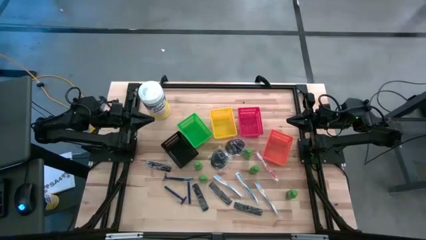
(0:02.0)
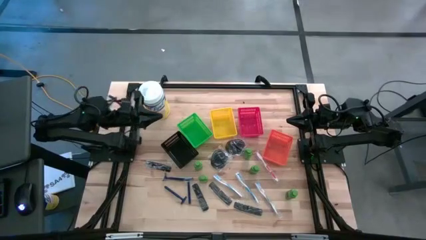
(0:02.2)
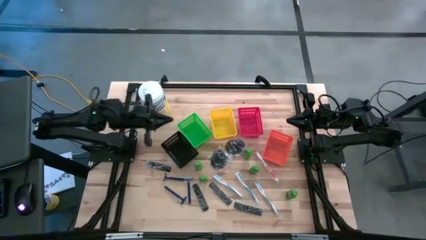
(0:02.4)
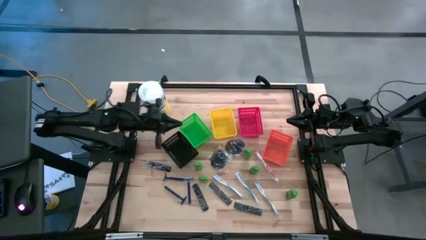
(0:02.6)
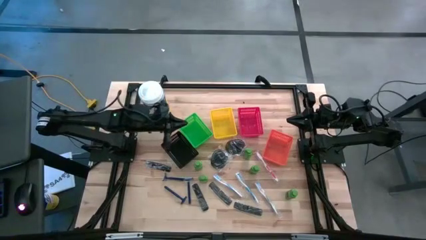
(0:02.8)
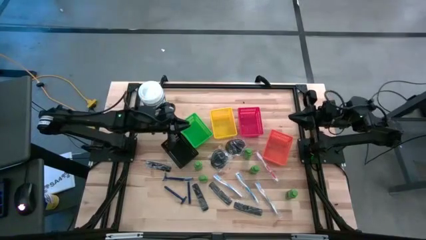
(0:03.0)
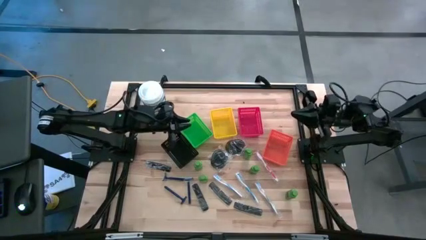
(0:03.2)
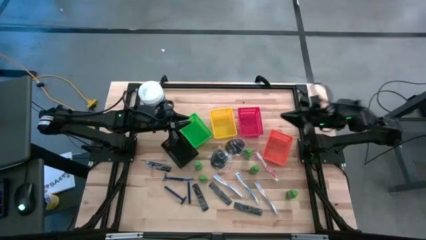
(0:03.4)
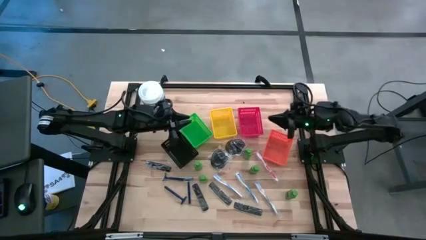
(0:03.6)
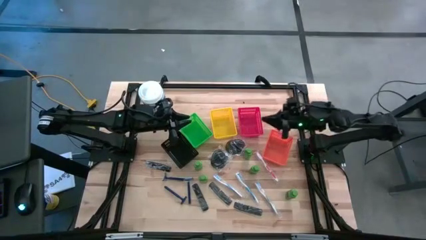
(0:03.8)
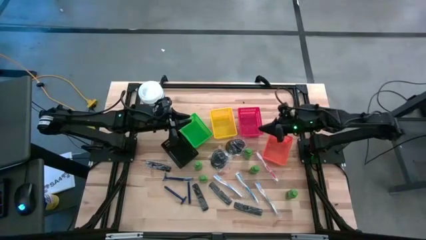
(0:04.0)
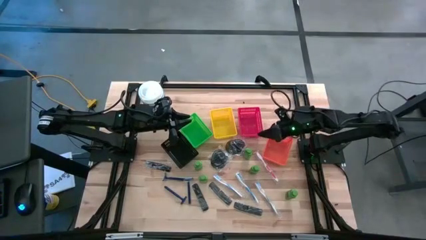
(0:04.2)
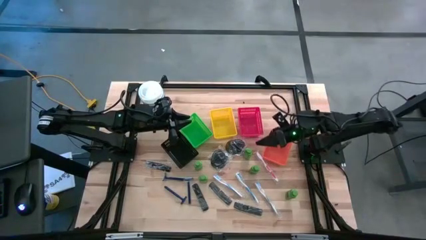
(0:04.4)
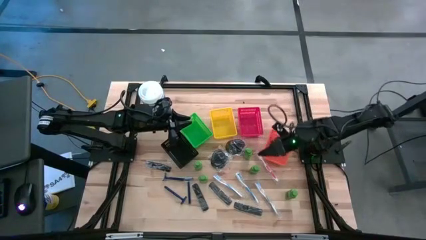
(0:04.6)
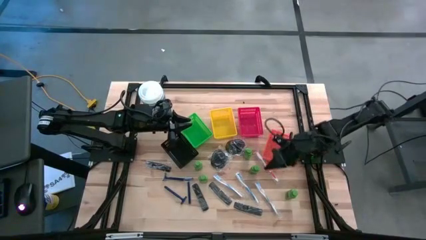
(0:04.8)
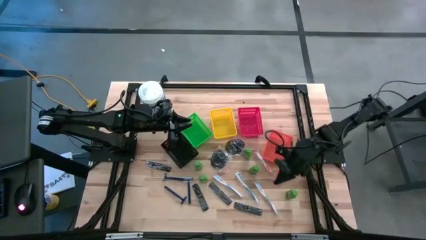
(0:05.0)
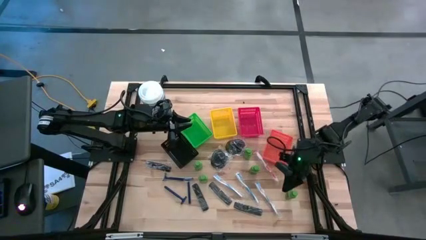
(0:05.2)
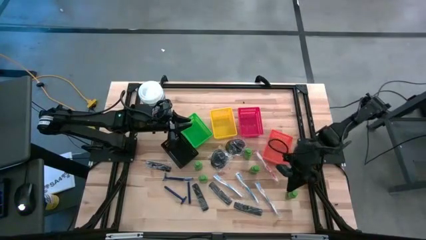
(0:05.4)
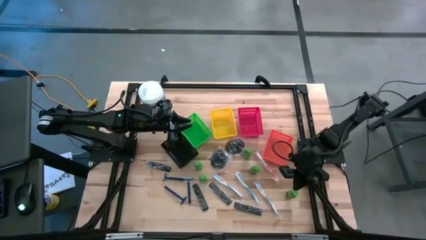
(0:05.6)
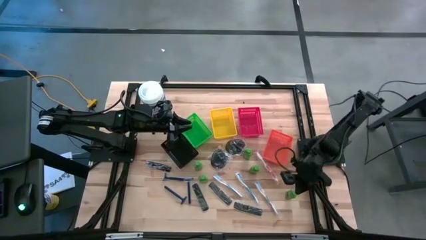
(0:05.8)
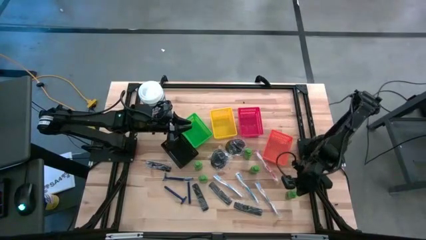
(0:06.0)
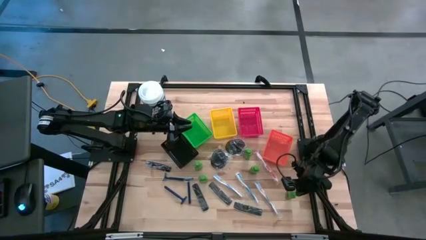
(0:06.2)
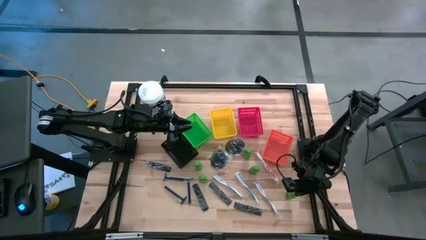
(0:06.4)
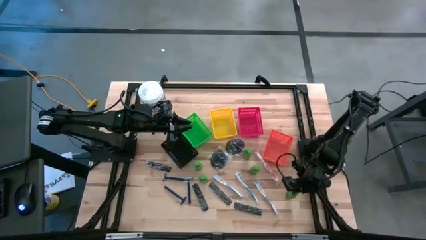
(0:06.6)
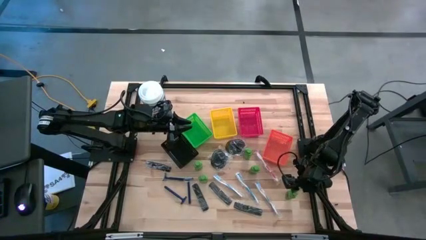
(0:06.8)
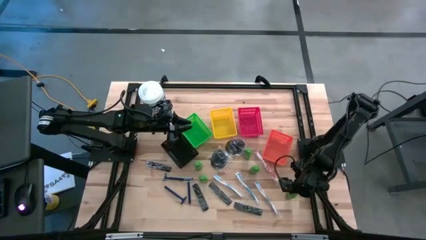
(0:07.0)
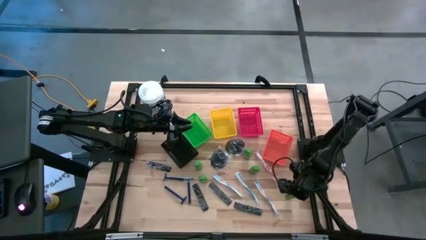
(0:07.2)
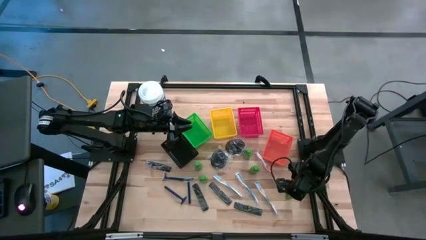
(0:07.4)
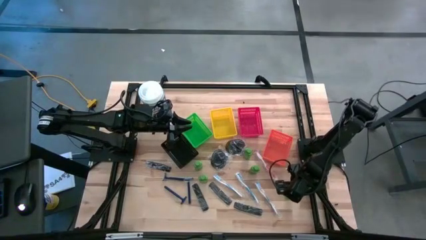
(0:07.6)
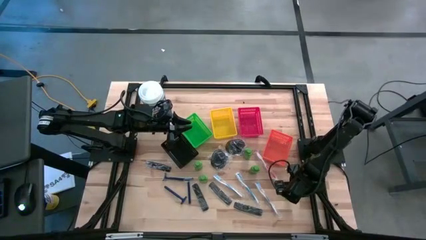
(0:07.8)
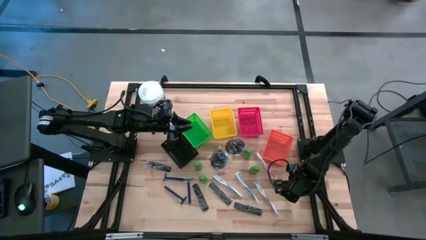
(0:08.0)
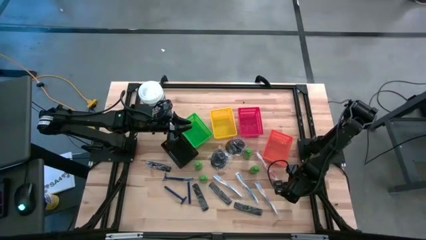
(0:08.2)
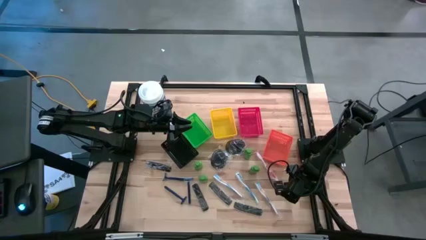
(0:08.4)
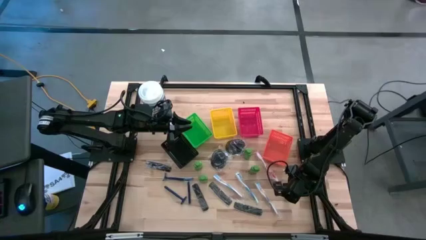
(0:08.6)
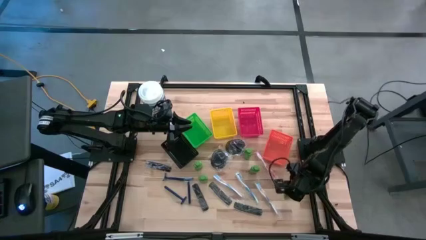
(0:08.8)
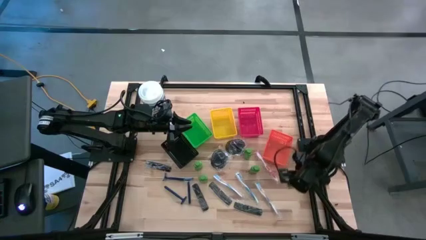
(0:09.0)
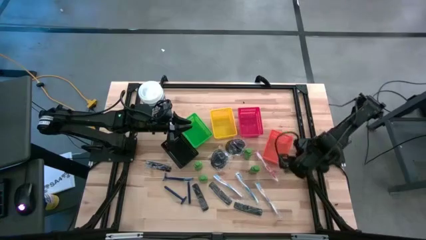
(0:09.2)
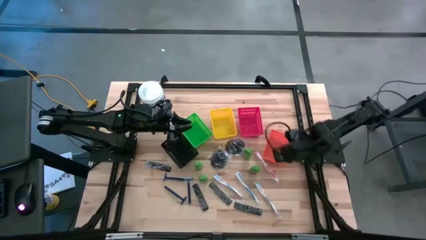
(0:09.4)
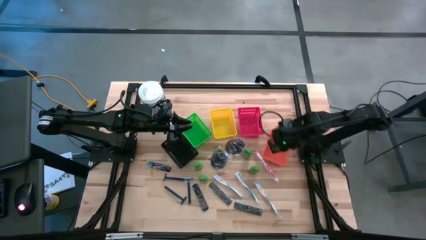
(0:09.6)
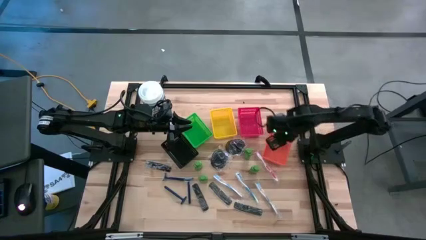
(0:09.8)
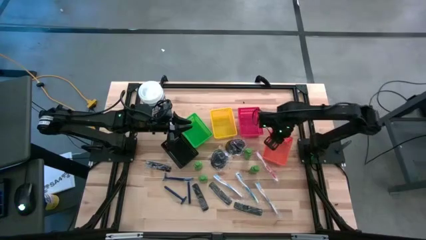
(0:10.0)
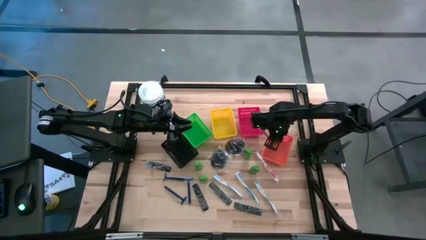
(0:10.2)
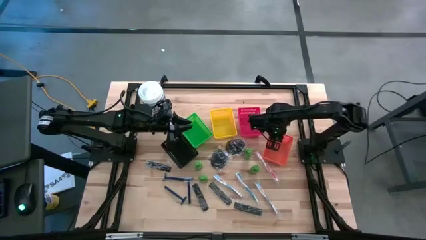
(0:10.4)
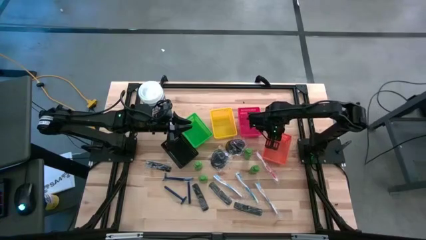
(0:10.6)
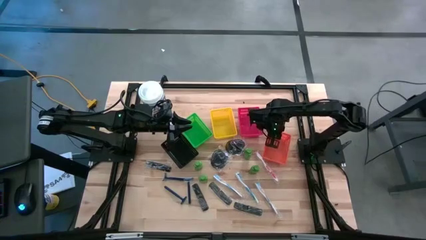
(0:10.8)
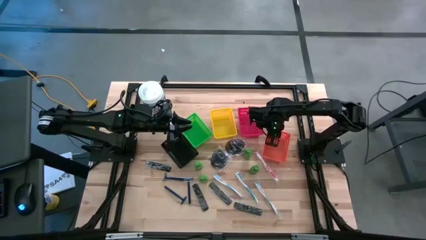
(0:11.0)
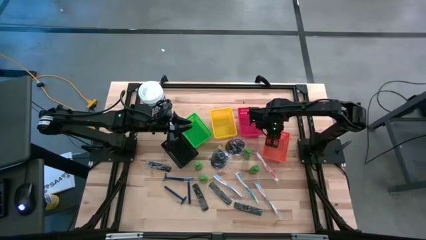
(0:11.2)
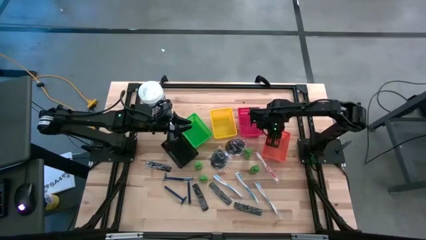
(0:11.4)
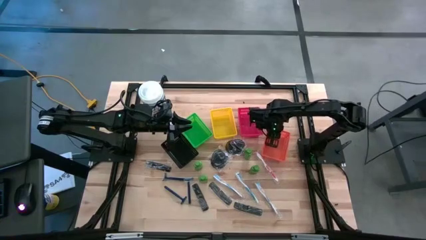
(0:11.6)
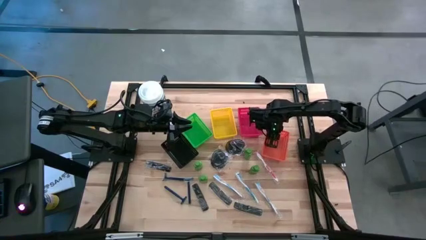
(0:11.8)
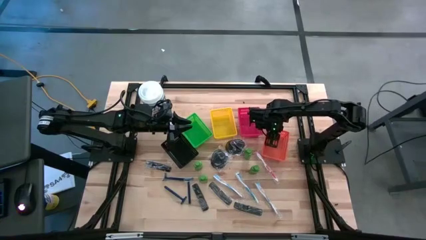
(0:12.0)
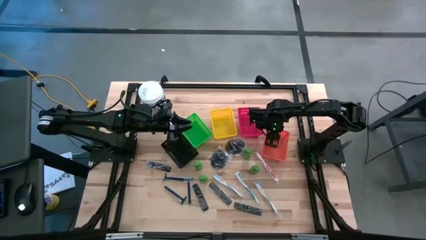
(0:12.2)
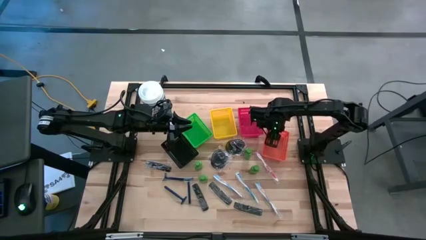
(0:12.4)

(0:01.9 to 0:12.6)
Task: Pick & Place Travel size toiletries
Put the green shampoo into the orange bin

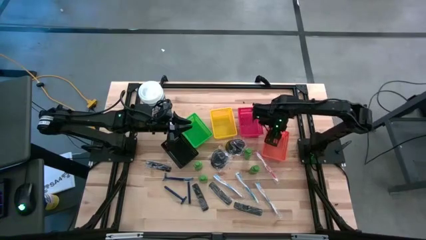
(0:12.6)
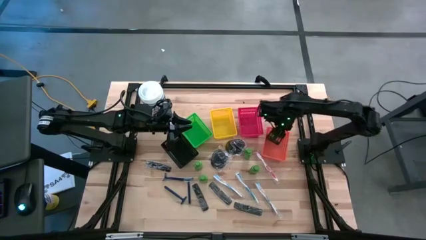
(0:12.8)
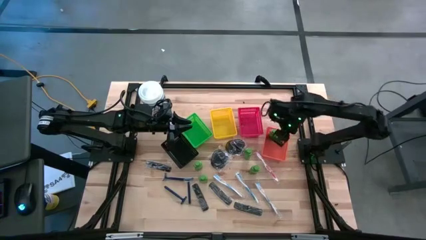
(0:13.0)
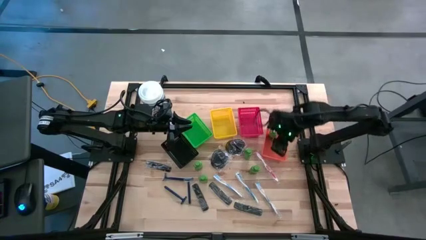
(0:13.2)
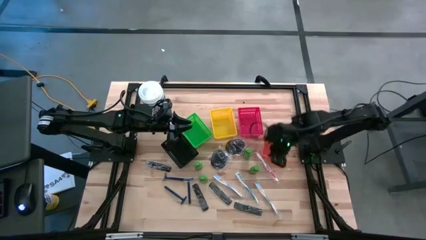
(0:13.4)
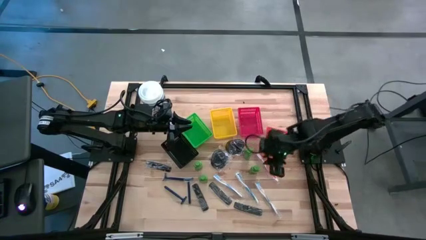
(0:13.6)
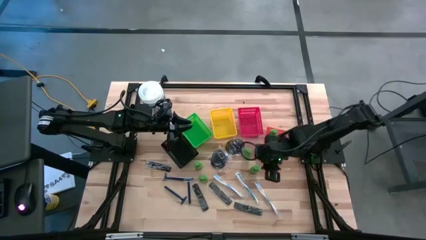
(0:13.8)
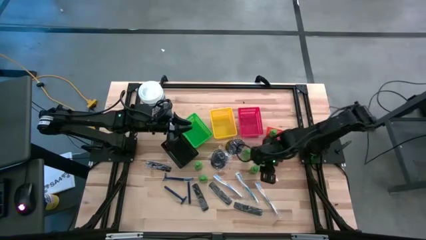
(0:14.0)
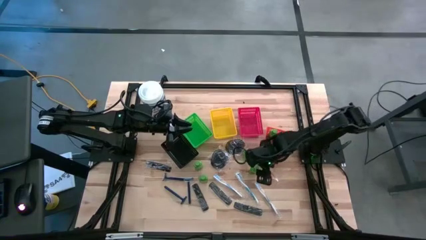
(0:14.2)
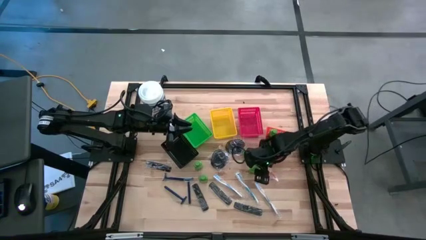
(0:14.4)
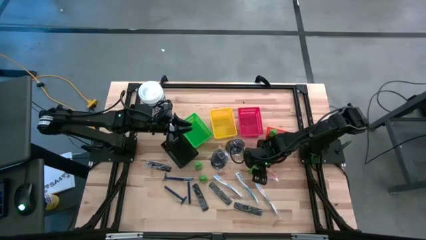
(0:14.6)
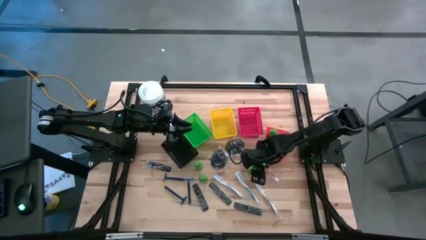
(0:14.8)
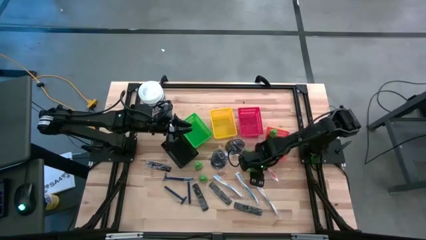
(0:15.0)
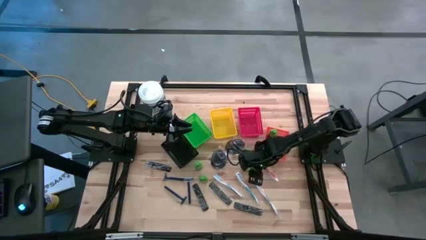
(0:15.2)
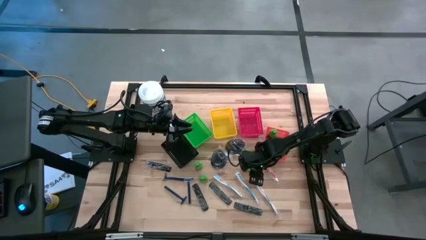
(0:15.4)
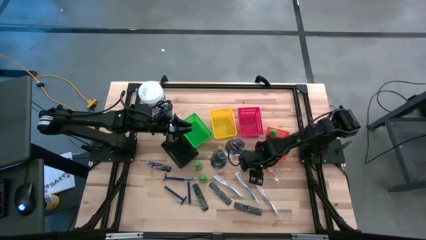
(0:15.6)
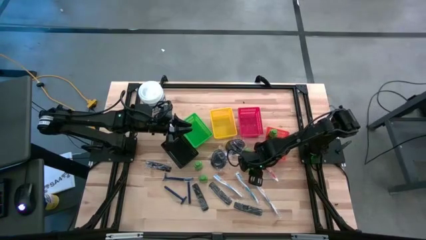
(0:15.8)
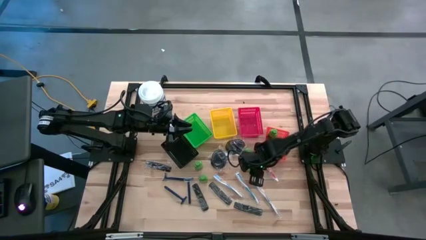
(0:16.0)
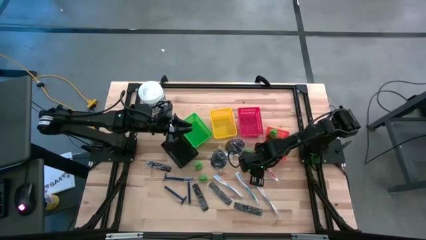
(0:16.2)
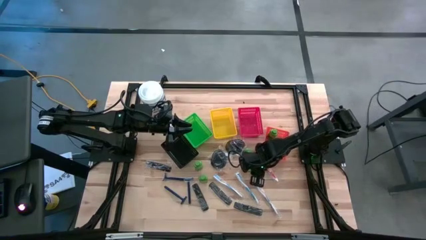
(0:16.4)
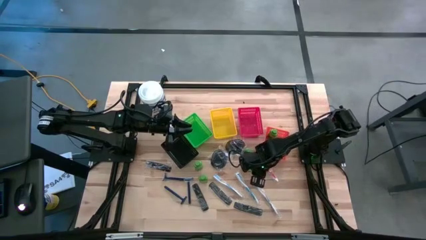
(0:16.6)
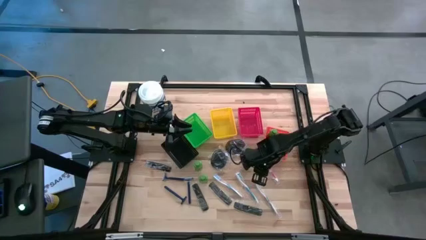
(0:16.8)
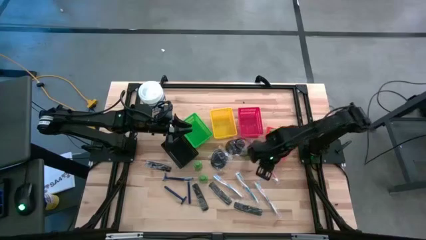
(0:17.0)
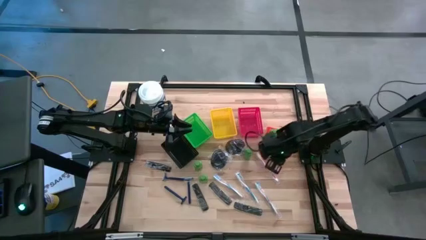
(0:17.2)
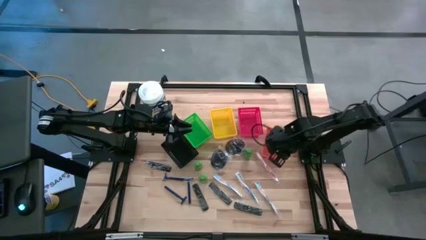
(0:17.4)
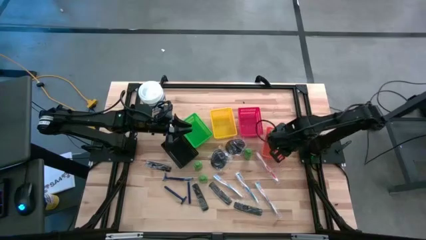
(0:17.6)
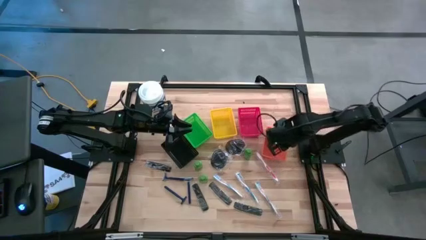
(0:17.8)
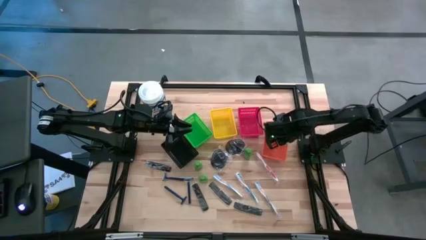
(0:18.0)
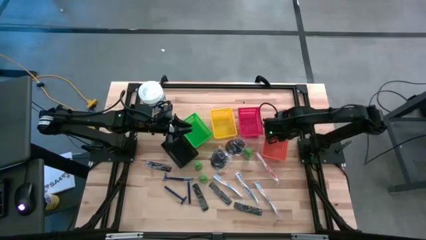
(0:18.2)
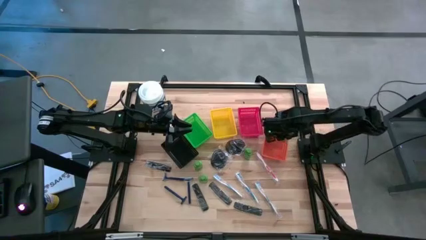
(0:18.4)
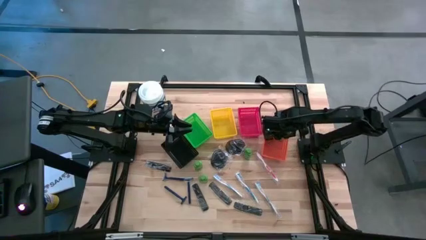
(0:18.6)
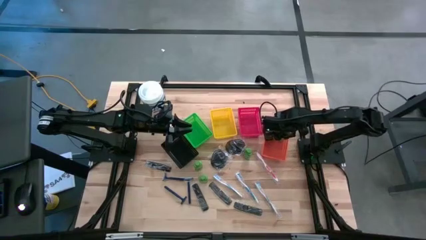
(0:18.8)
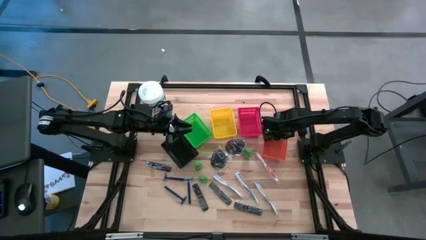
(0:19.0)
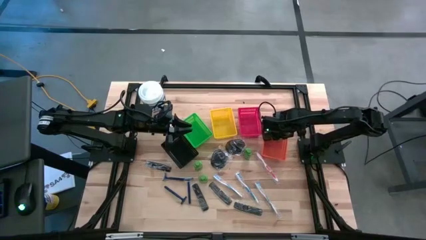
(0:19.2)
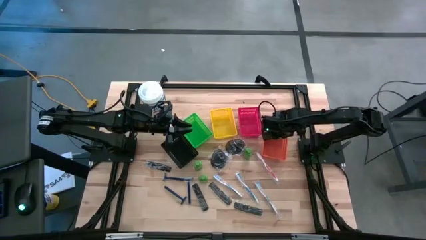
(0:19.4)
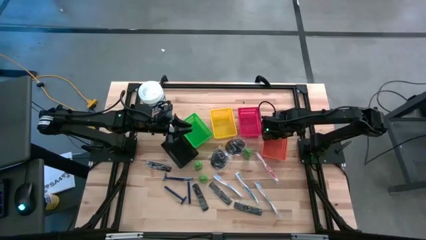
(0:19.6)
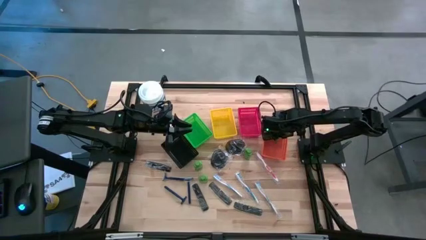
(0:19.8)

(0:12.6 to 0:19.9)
Put the green shampoo into the orange bin
